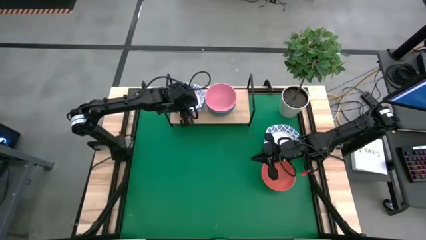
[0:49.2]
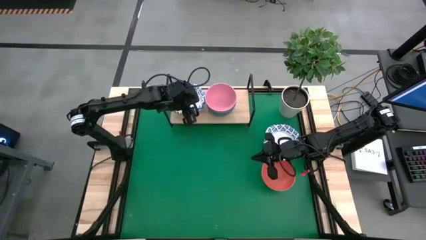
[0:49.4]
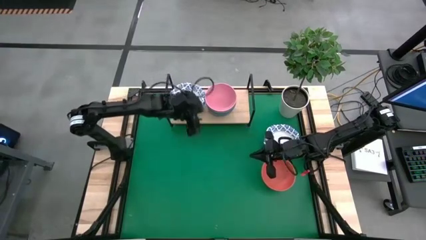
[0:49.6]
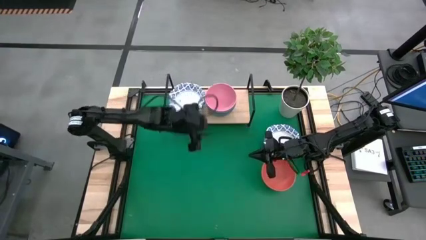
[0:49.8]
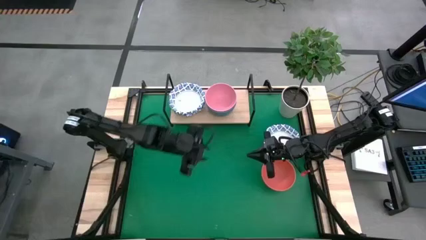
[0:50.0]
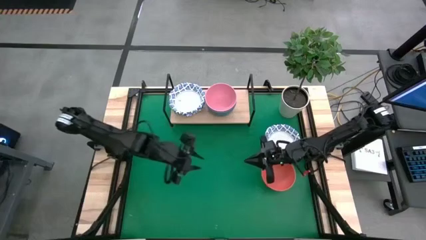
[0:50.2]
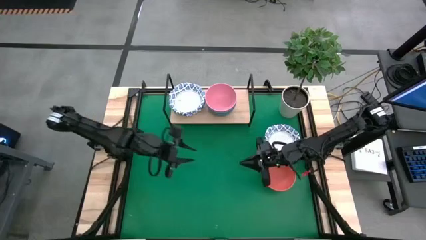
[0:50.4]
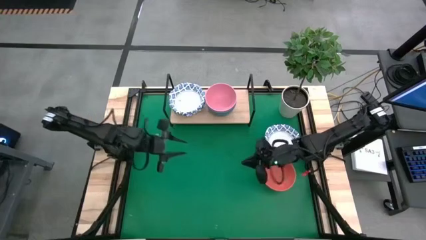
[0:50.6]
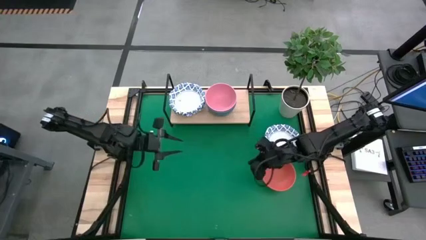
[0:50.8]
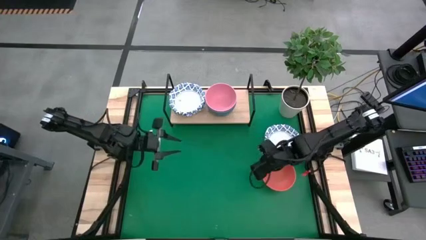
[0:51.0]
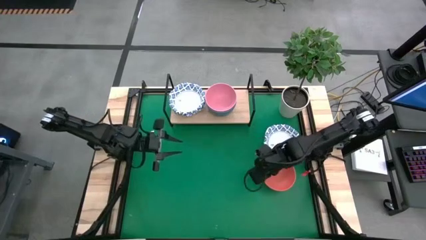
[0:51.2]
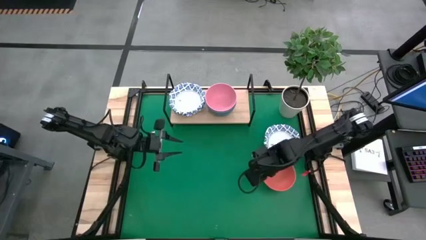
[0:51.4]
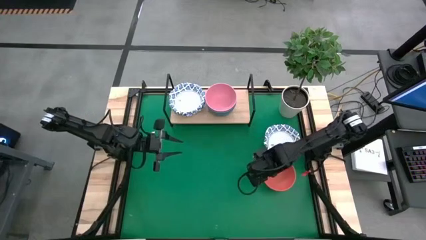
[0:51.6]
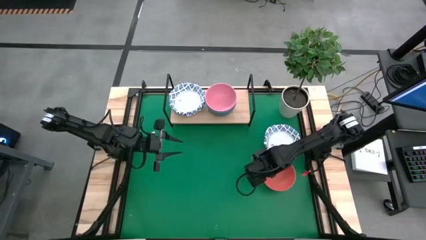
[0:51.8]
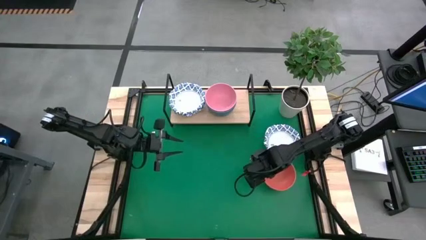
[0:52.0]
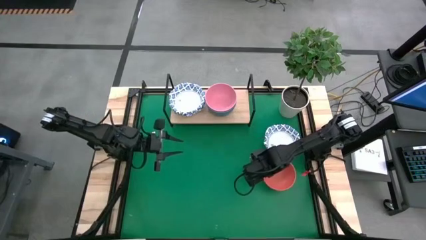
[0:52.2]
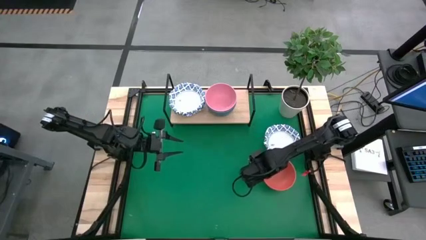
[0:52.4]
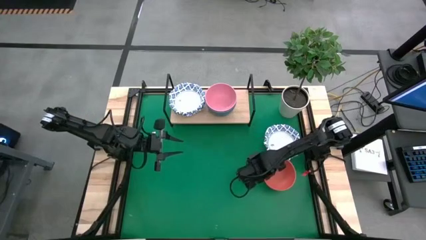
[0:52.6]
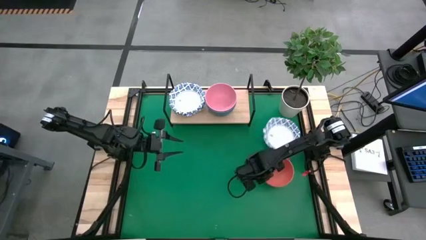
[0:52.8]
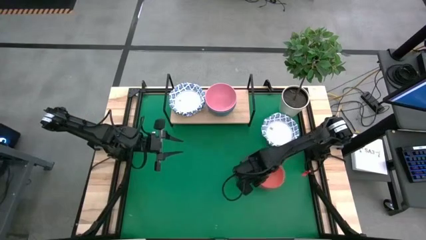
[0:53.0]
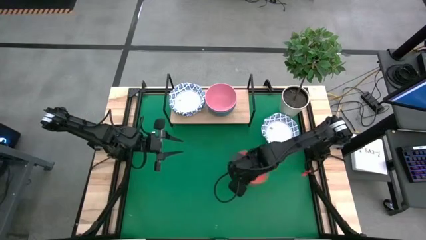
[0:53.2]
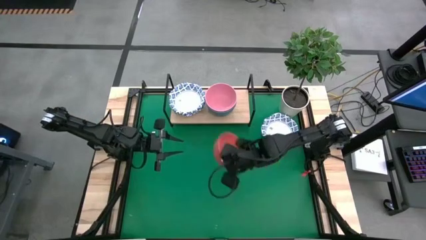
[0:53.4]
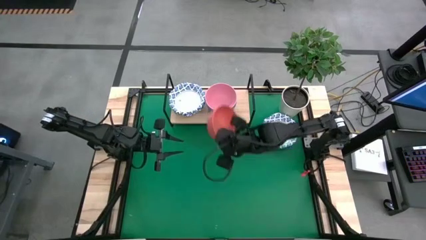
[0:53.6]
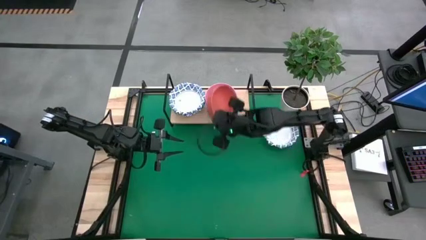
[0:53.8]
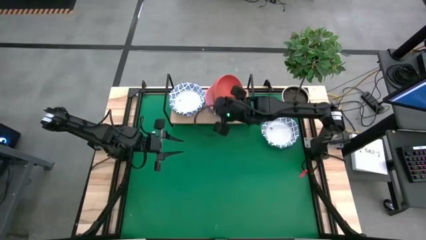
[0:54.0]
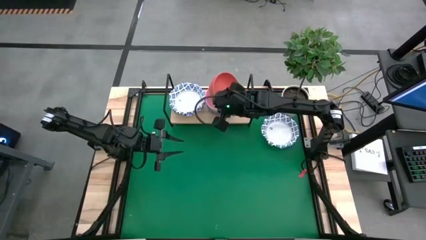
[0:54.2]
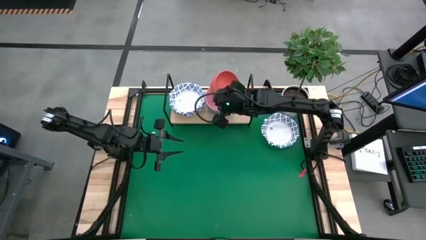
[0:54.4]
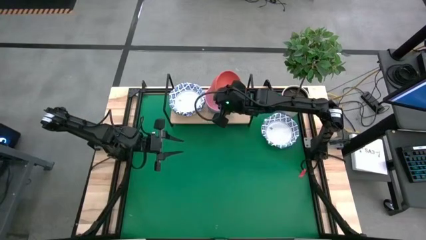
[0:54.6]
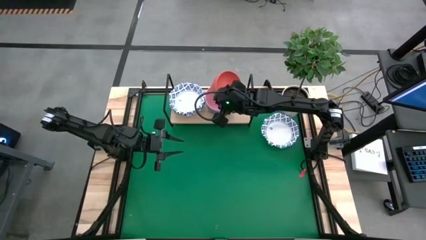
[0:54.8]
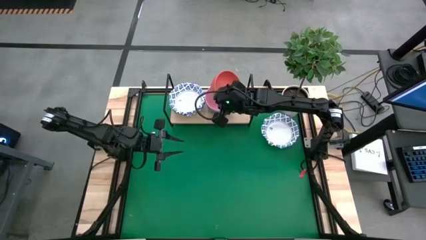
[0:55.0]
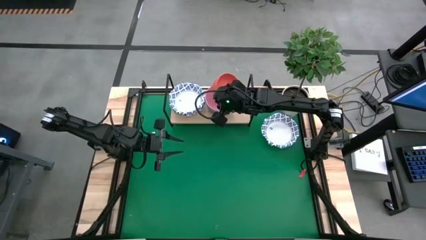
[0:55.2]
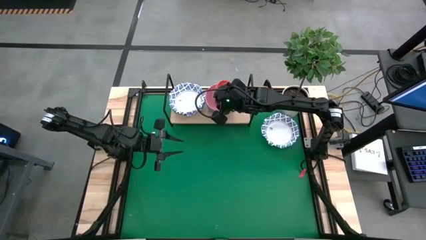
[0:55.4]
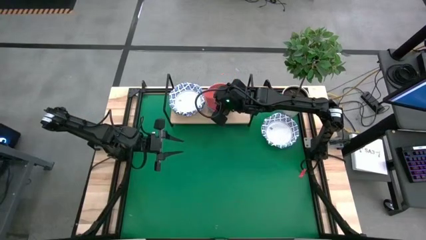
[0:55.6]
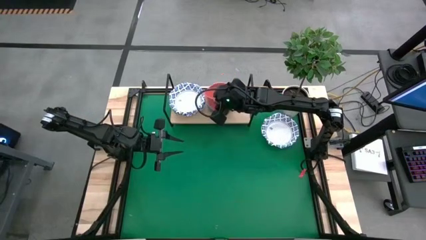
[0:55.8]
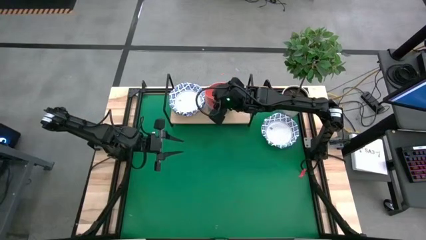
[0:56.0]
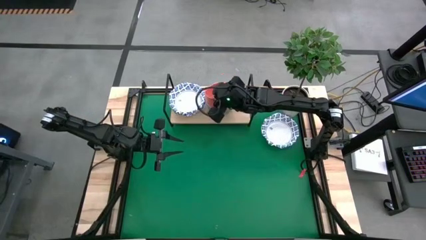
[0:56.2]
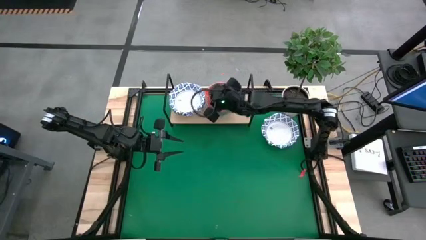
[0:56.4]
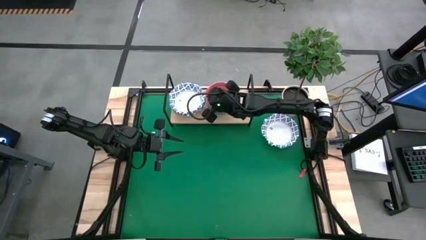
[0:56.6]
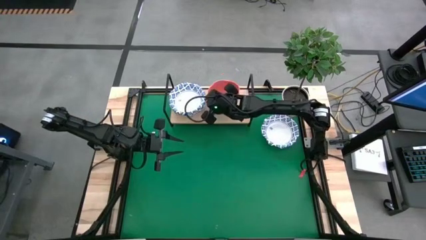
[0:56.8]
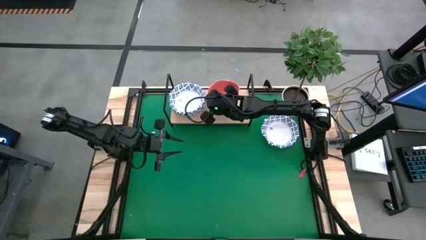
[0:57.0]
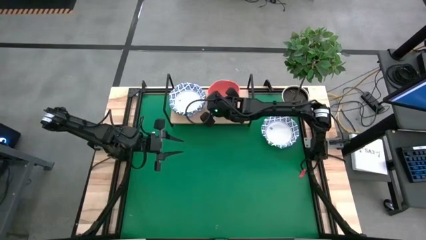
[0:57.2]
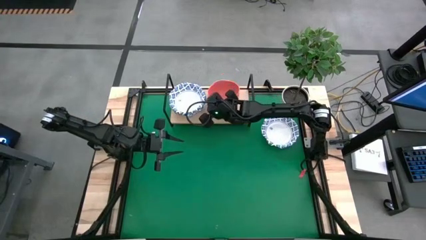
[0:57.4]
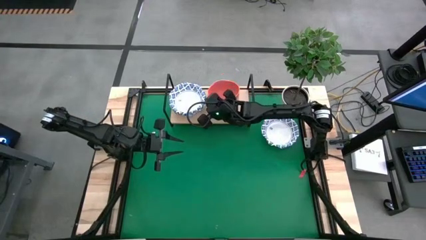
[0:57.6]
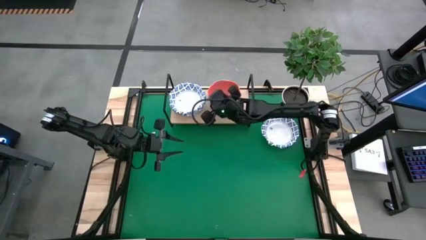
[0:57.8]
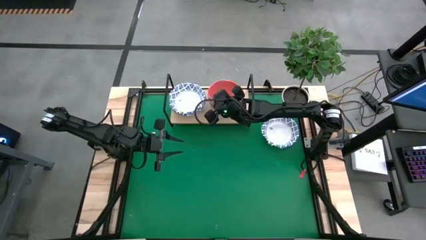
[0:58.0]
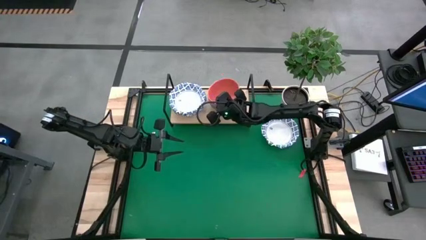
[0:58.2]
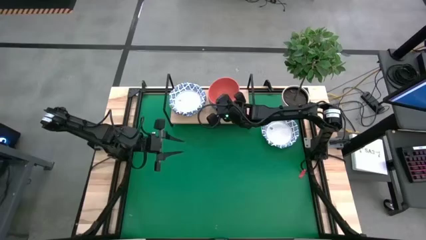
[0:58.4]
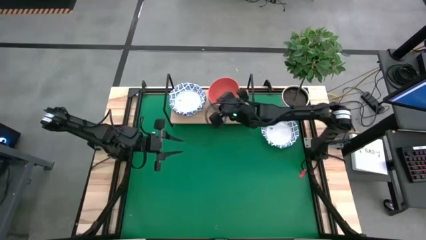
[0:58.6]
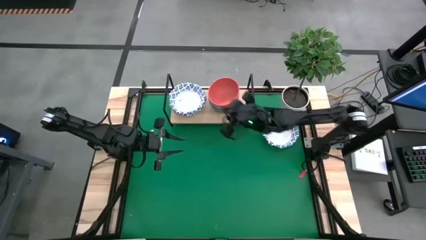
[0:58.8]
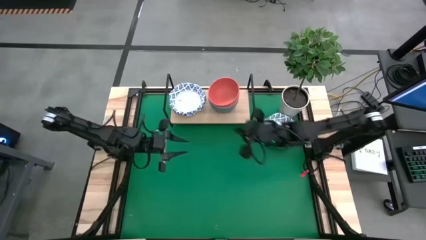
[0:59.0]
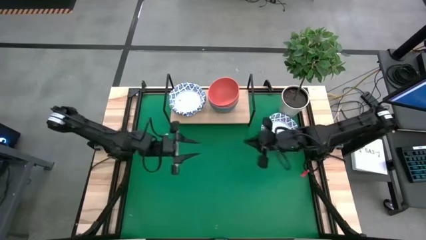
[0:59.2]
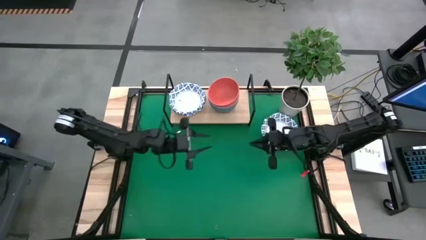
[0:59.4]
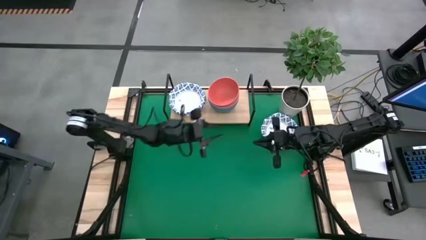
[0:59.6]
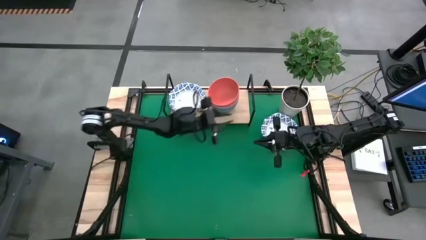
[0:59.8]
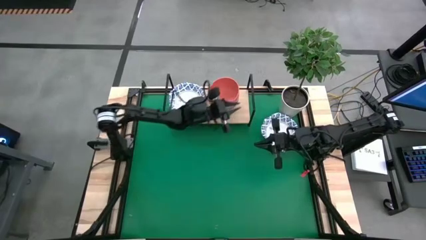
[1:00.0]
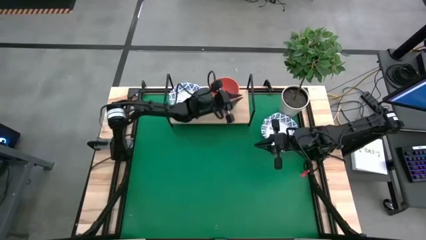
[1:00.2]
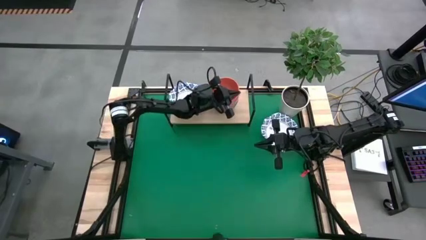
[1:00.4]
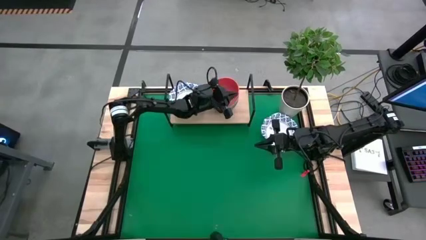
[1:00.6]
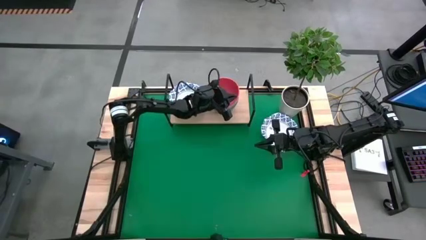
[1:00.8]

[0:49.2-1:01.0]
Task: Place and stack bowls onto a shelf
Stack the orange bowl on top of the the pink bowl on the shelf

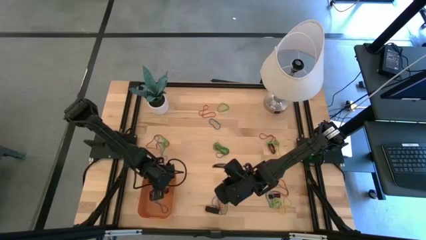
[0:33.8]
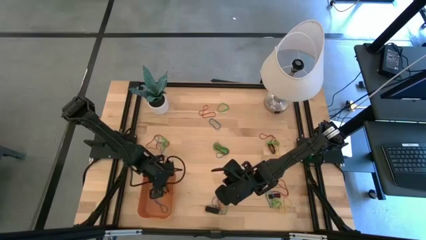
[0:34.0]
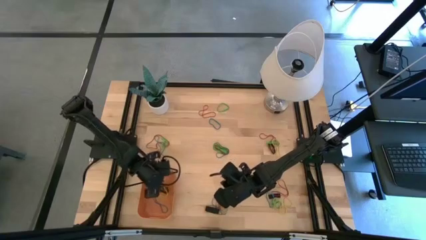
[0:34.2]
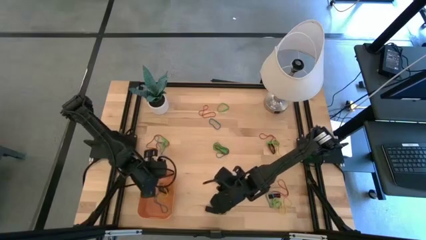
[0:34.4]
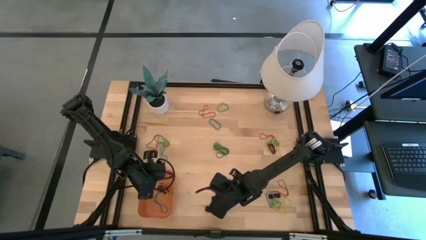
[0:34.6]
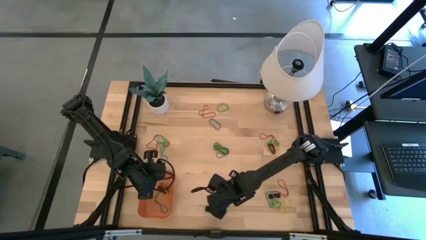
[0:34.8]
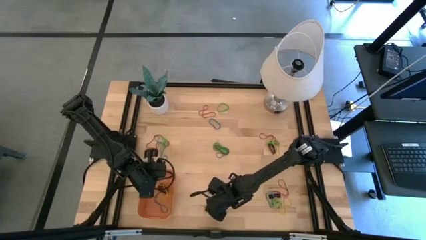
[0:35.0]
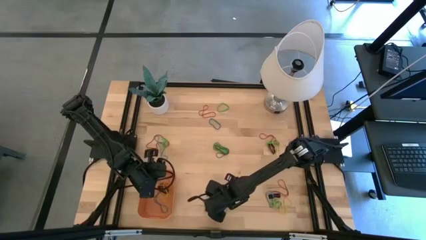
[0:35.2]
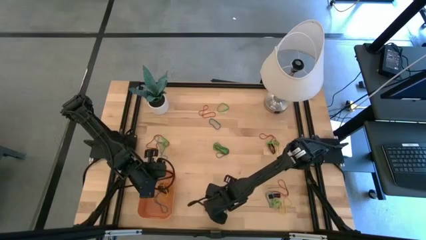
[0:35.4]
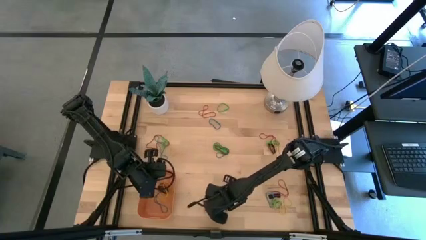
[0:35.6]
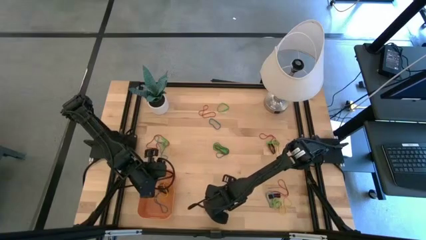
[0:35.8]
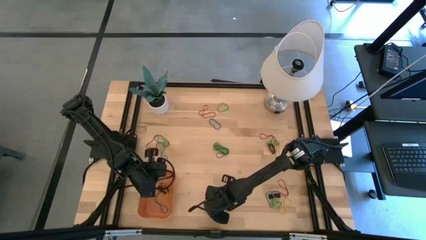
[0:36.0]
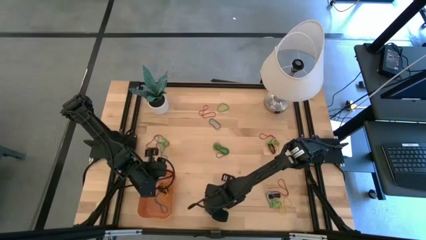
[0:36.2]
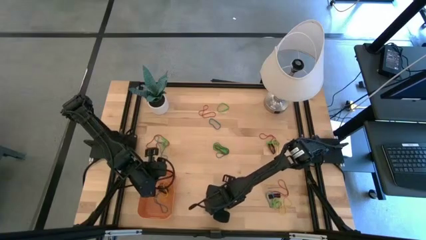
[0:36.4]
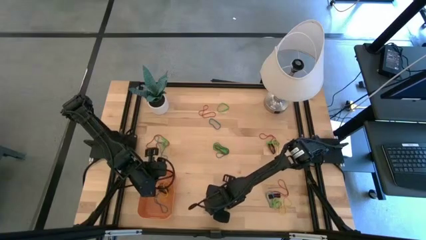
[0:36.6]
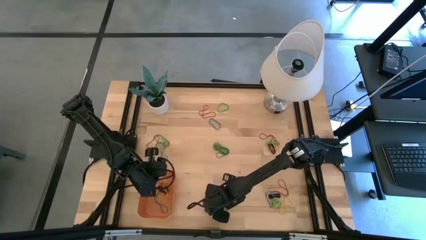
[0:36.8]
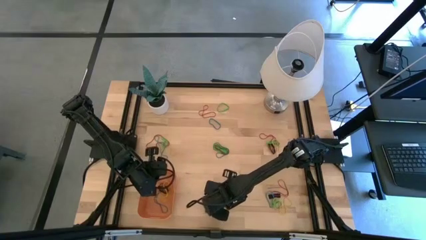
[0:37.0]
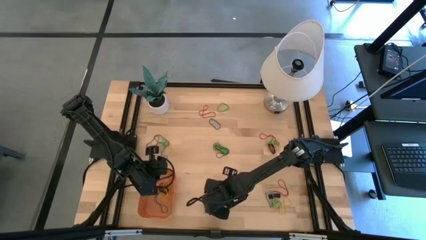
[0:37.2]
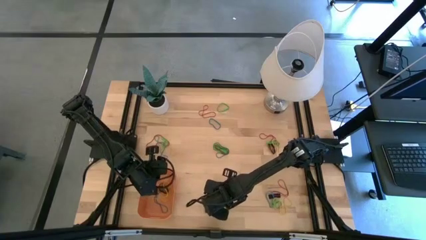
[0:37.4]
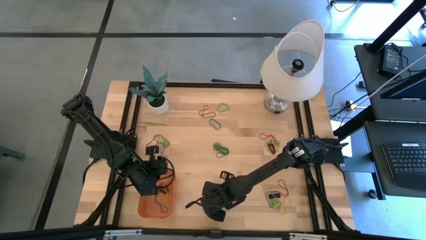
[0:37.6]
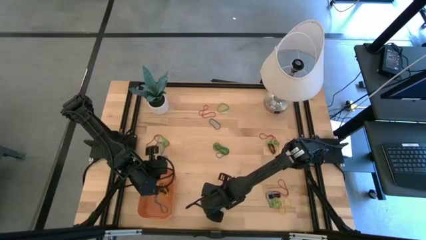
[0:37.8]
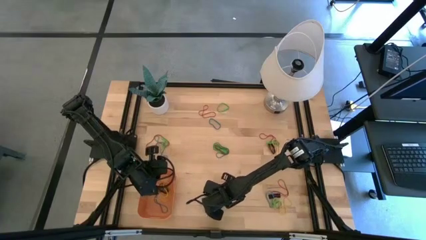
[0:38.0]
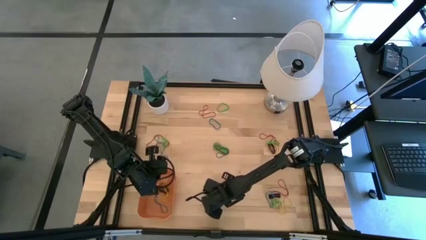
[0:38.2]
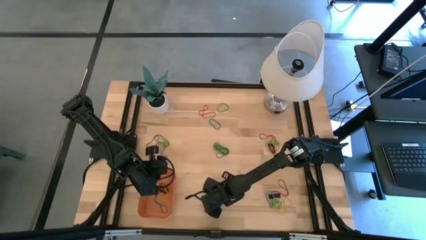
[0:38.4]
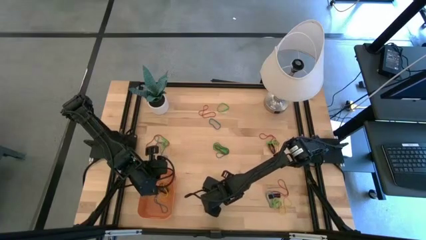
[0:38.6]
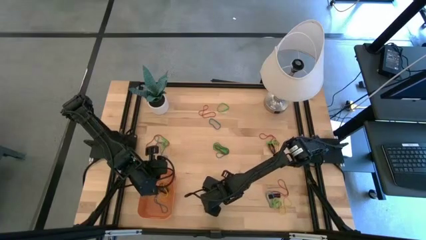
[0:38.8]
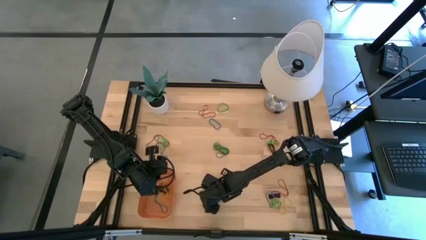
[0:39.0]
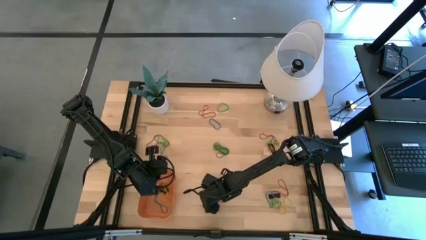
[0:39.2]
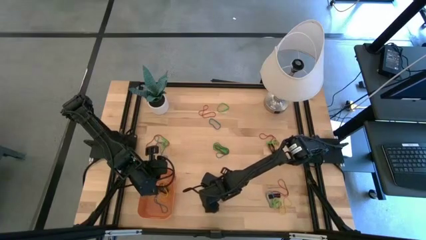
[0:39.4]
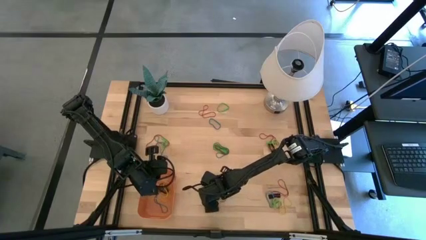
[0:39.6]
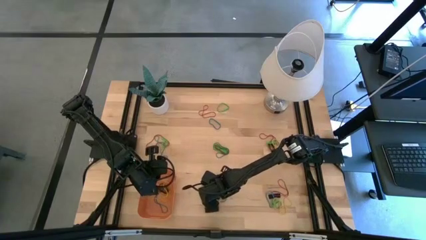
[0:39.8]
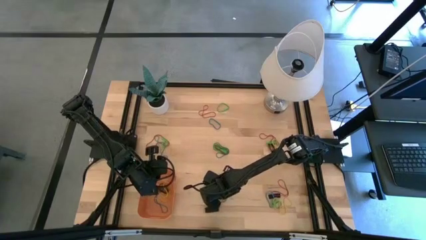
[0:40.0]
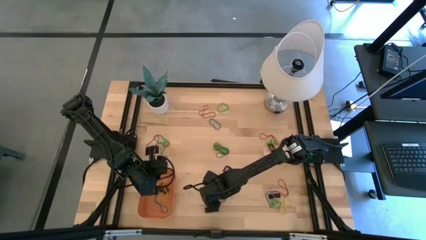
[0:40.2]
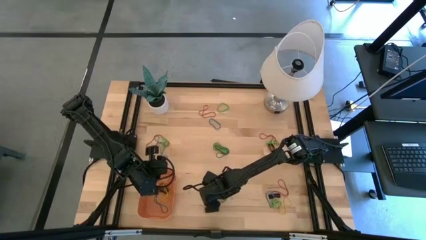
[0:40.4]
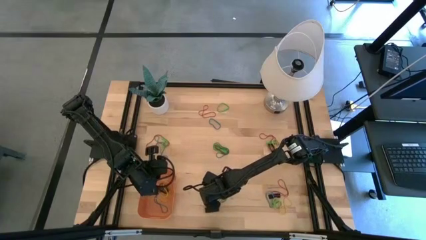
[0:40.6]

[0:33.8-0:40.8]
Task: Pick and place rubber bands into bin
Put the red rubber band into the orange bin
